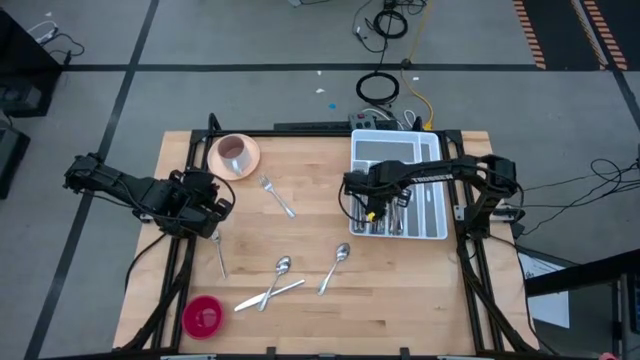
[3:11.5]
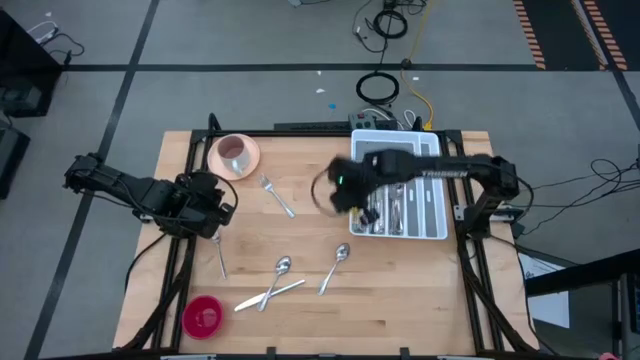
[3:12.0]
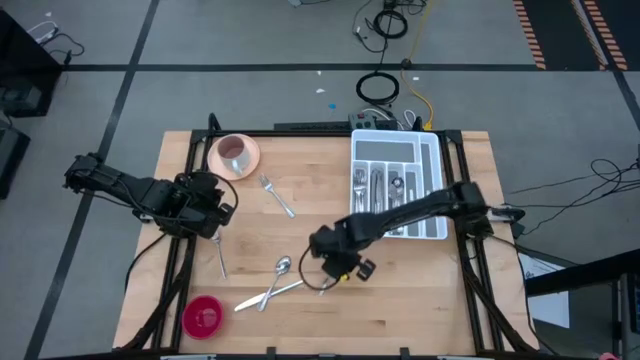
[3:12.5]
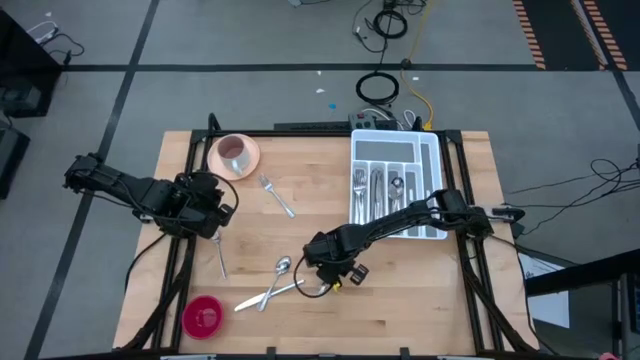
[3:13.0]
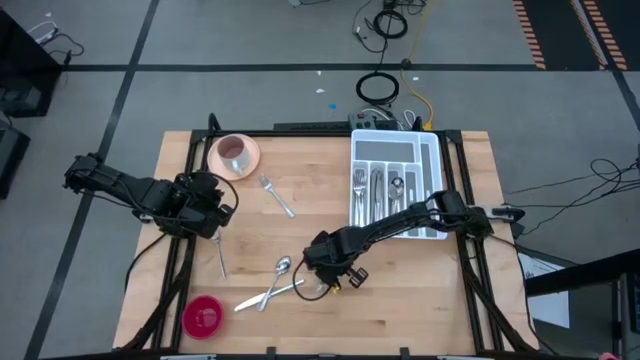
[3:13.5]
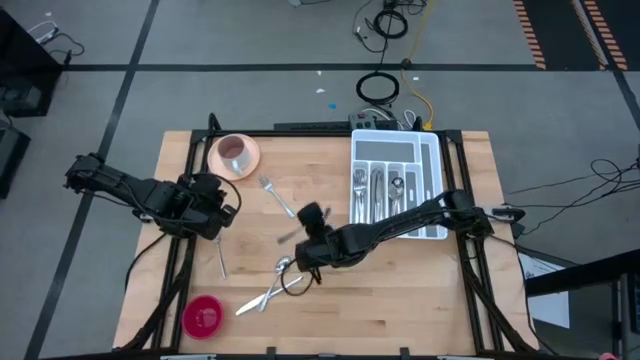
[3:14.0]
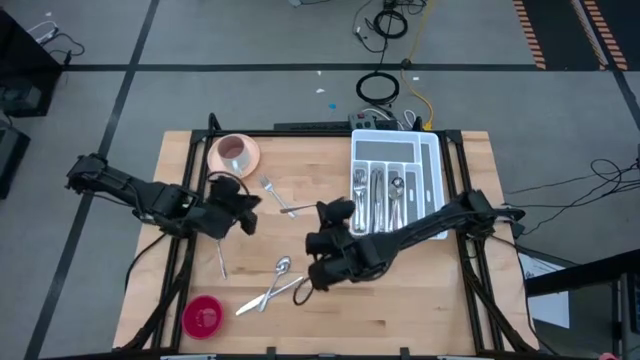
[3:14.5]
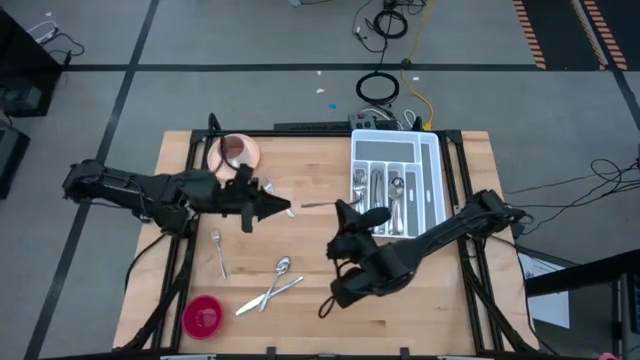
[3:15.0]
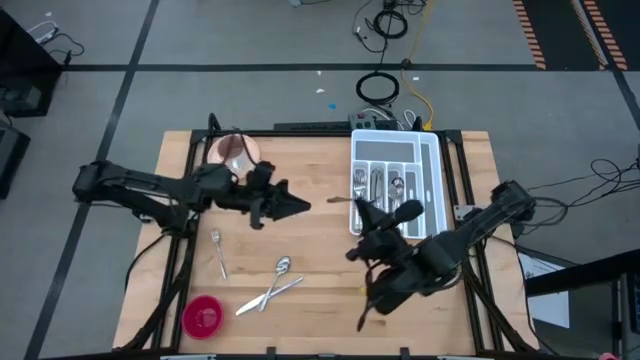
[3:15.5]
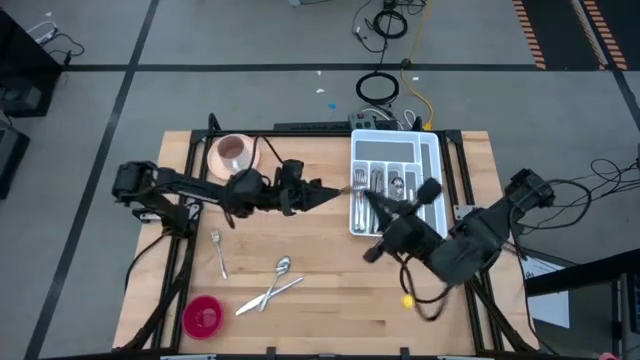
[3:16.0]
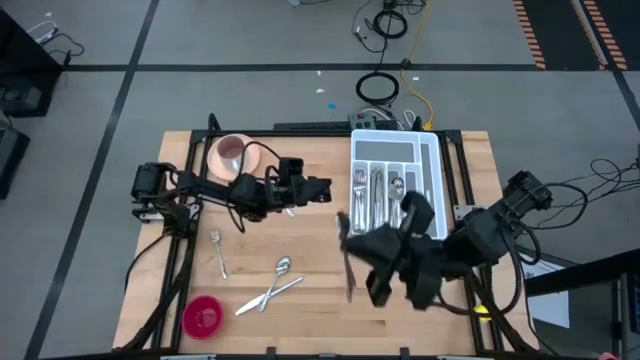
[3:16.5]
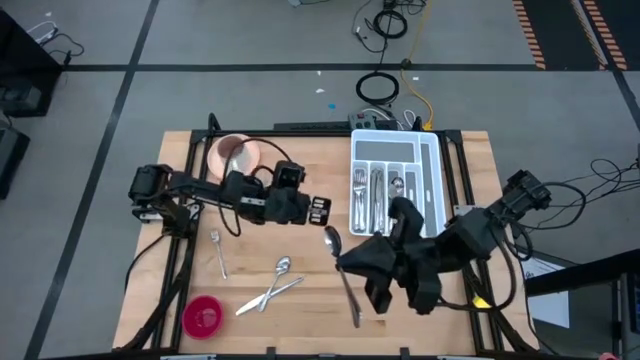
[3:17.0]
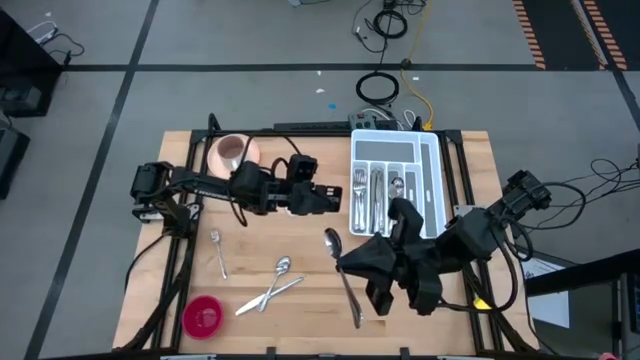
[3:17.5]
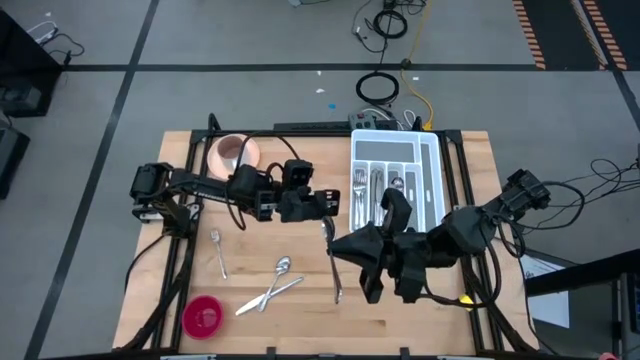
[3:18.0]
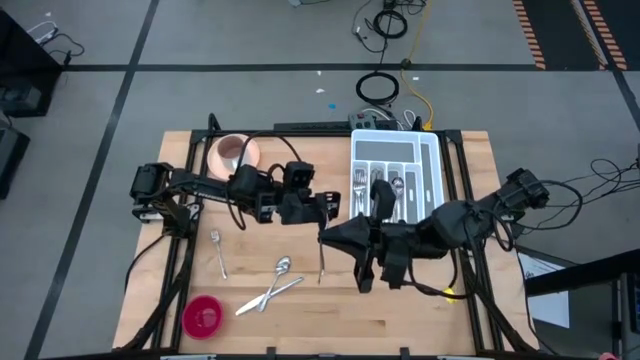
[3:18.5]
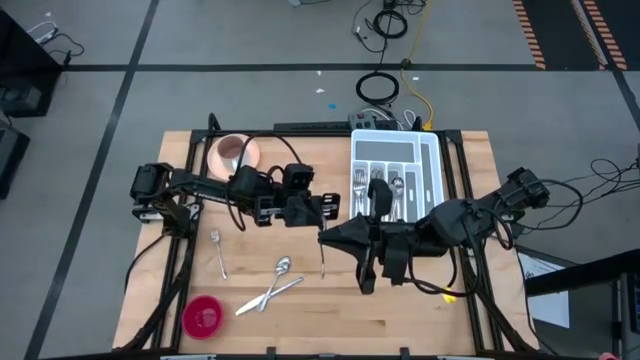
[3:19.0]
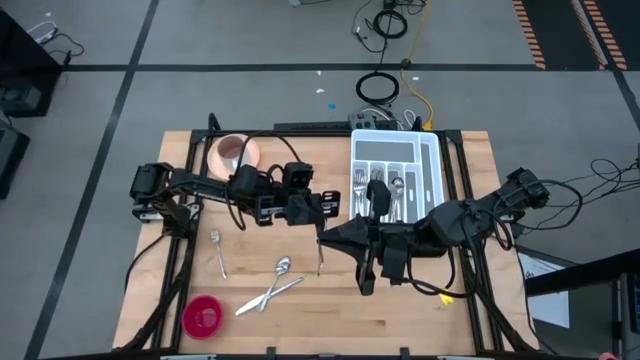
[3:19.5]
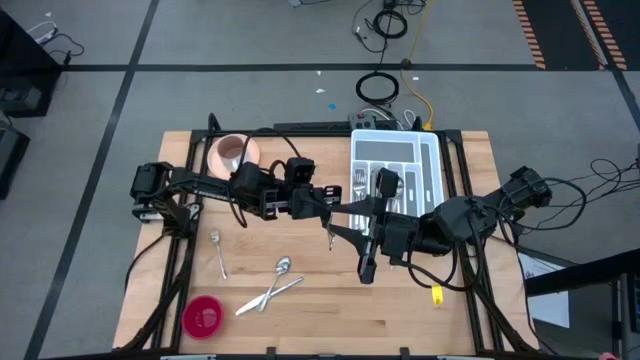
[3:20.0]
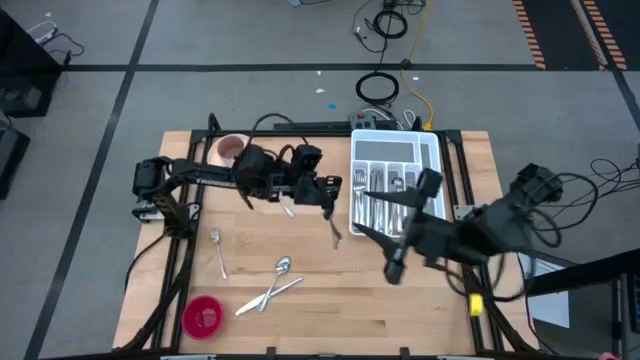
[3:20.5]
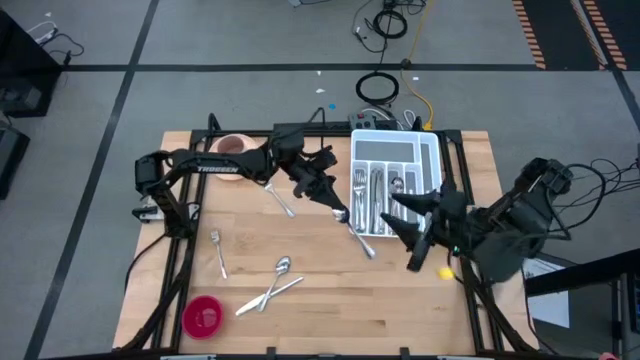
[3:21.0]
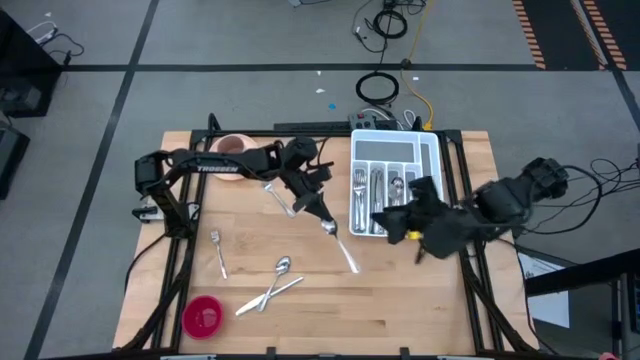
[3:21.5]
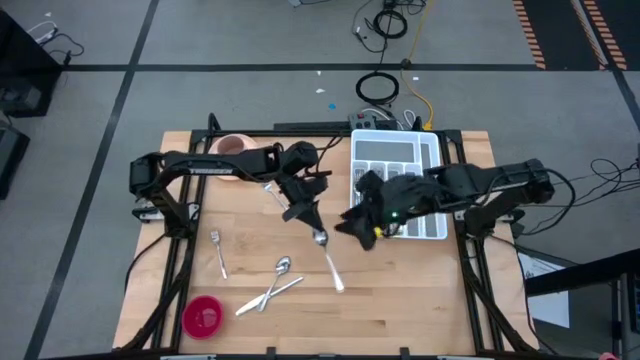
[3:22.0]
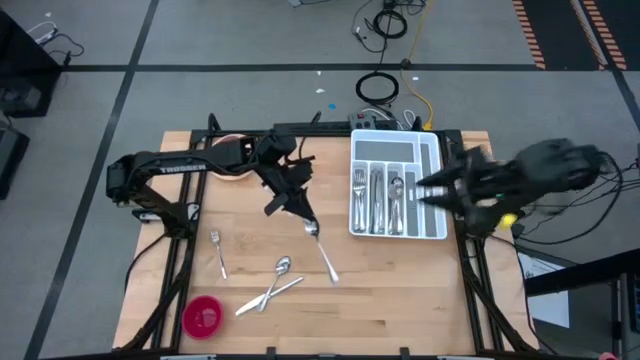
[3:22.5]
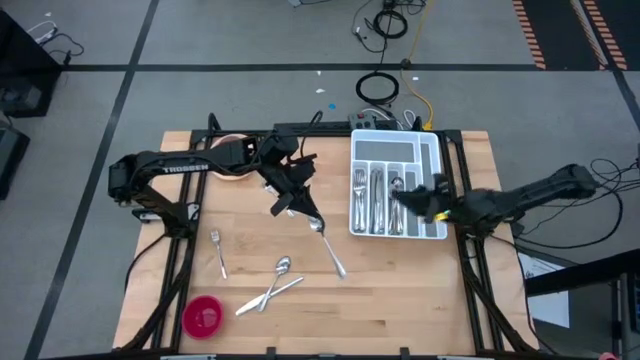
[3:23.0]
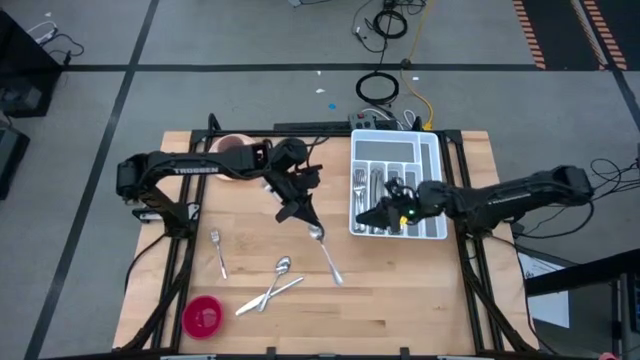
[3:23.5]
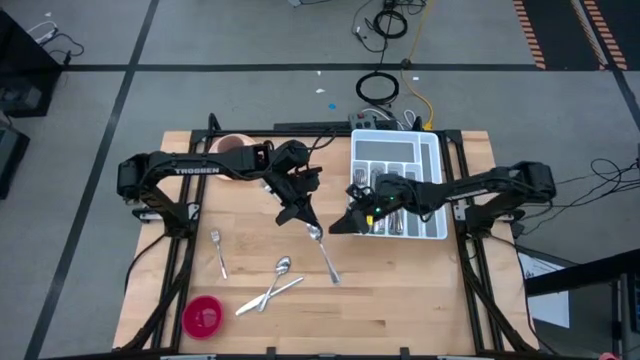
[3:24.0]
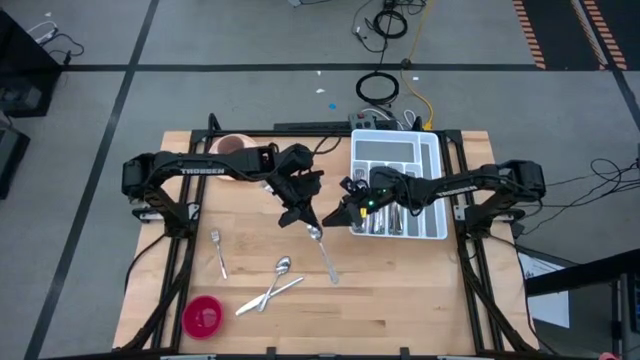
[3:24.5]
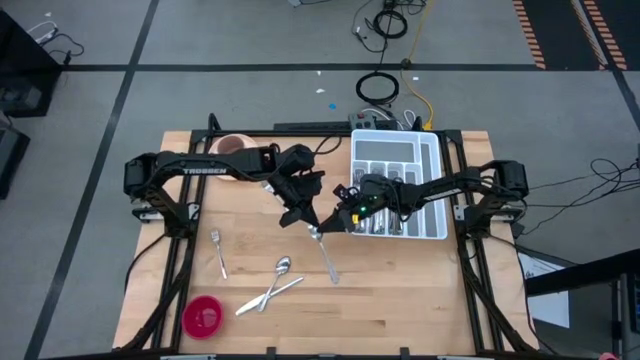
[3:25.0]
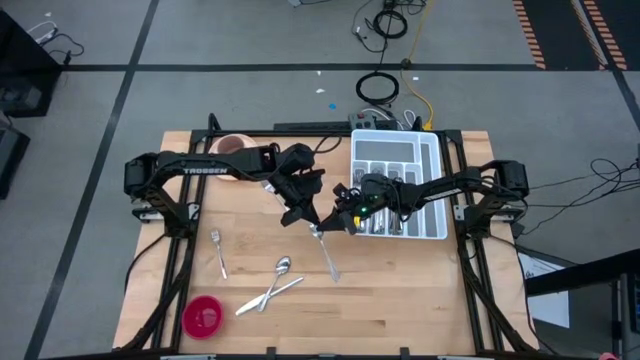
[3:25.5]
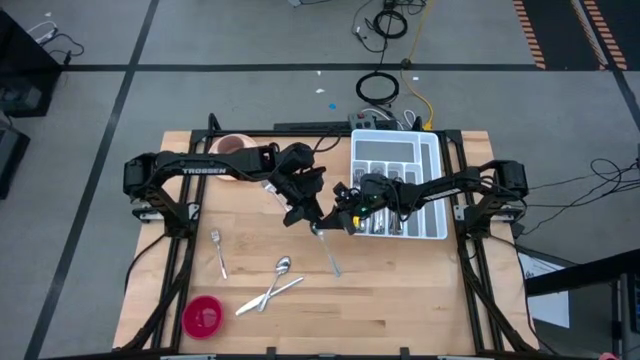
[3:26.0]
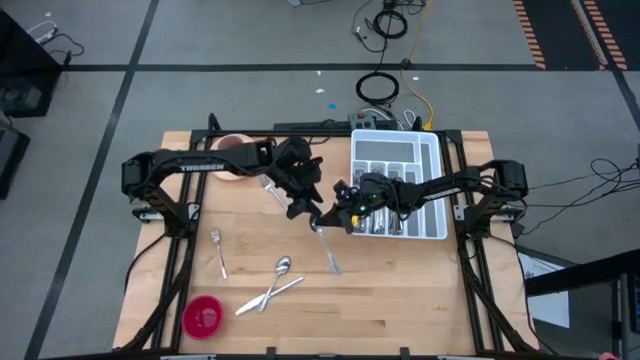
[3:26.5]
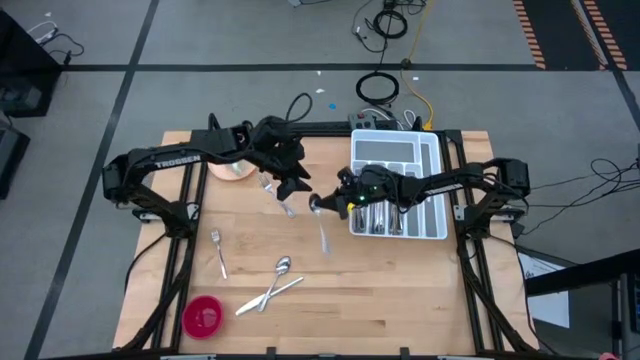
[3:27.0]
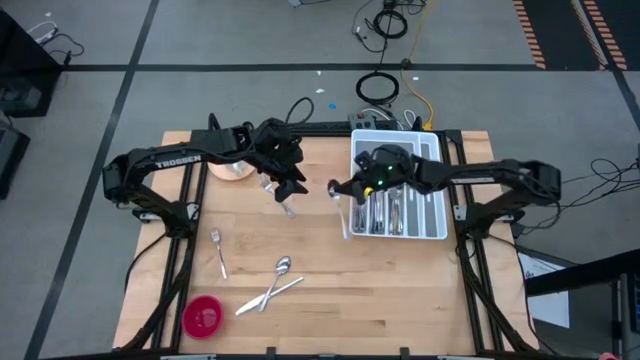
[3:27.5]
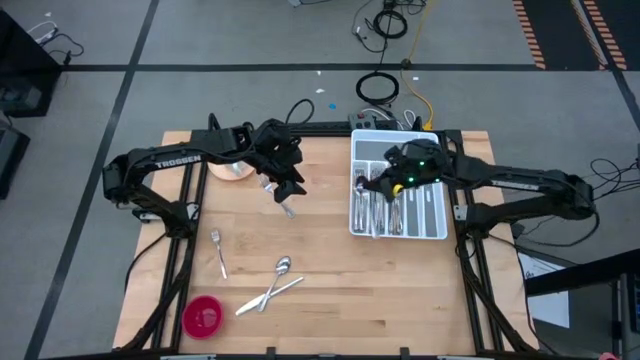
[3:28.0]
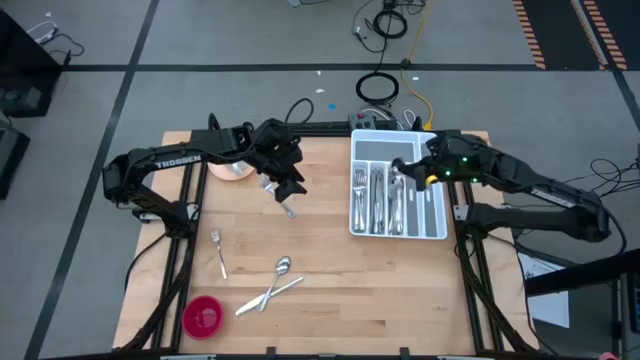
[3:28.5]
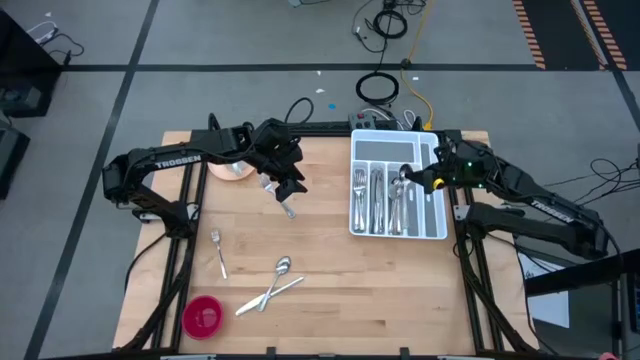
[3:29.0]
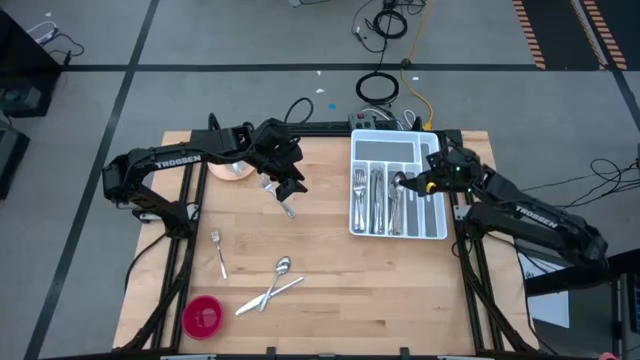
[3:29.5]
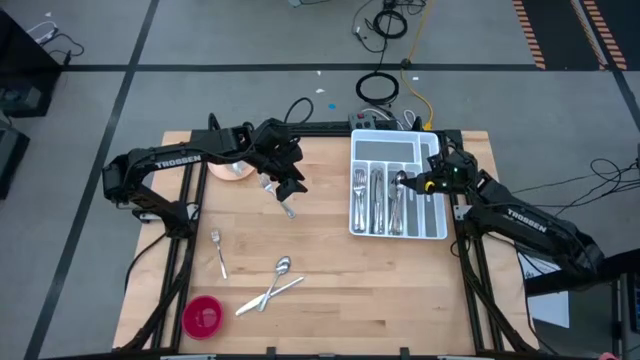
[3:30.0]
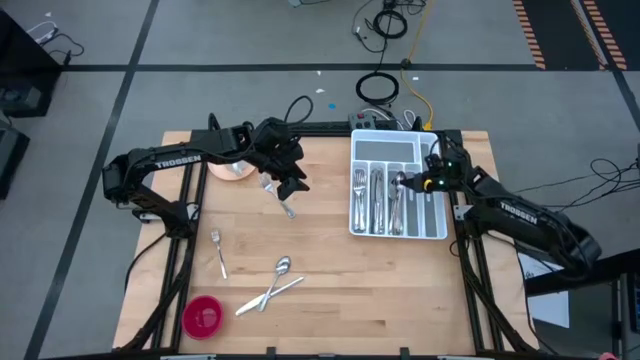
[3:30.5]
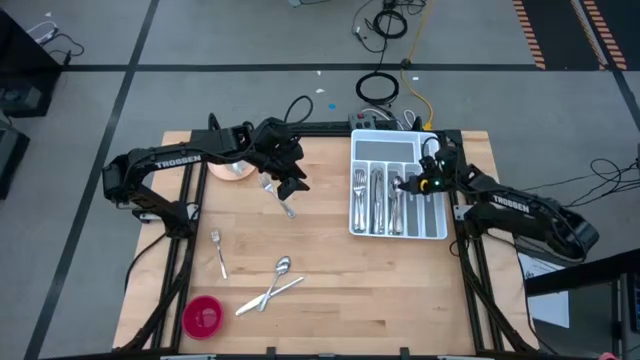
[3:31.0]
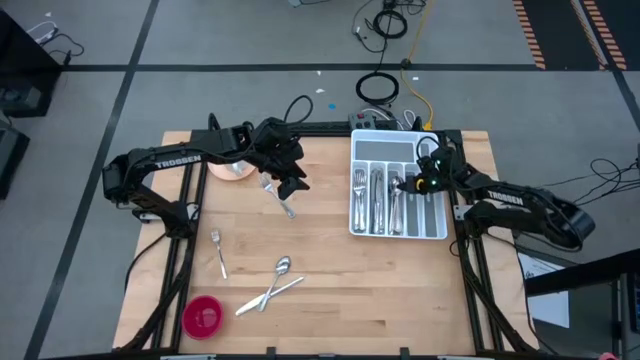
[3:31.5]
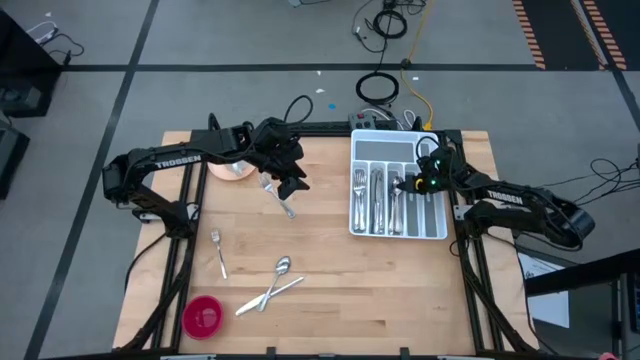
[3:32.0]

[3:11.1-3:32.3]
Task: Sort silverware
Put the right silver spoon into the white silverware tray
